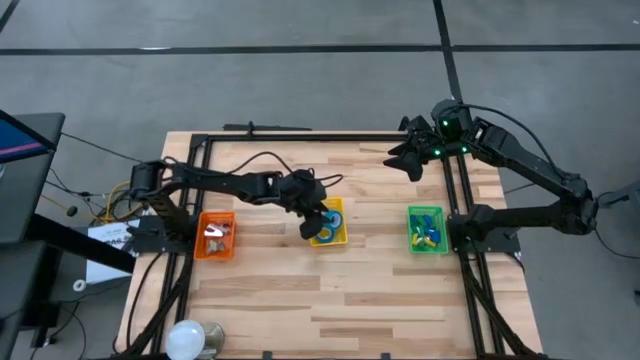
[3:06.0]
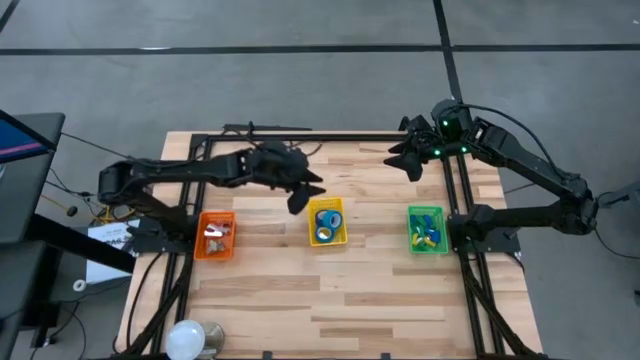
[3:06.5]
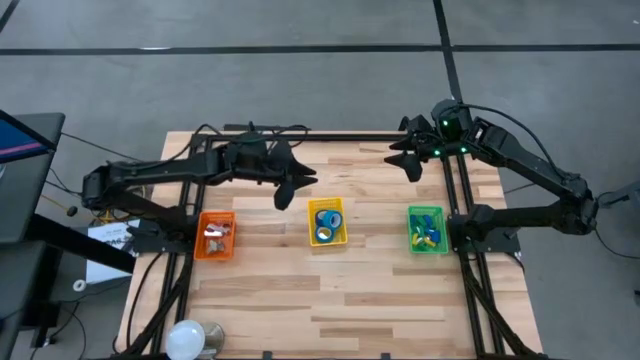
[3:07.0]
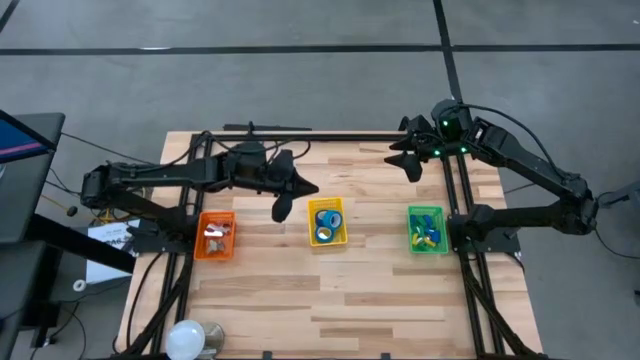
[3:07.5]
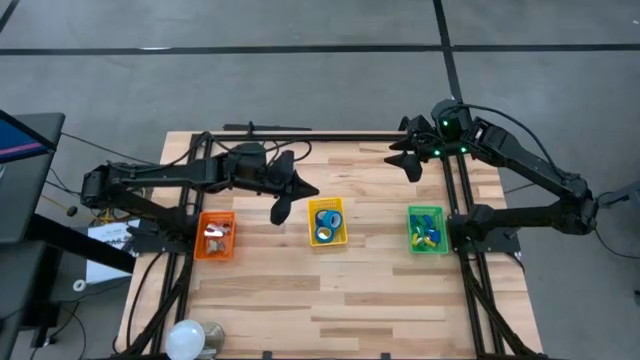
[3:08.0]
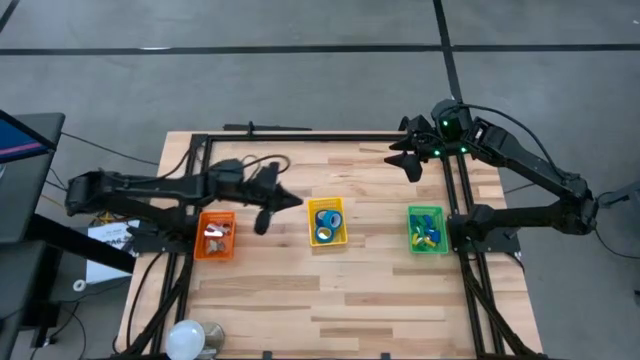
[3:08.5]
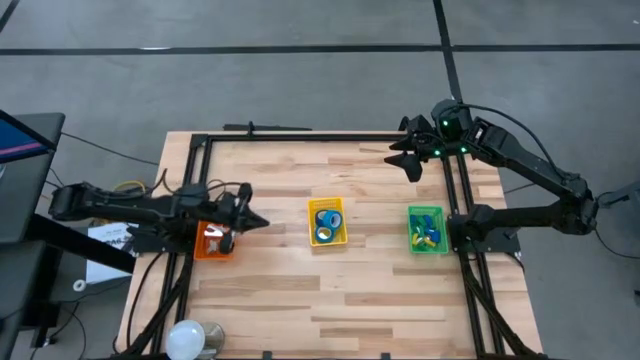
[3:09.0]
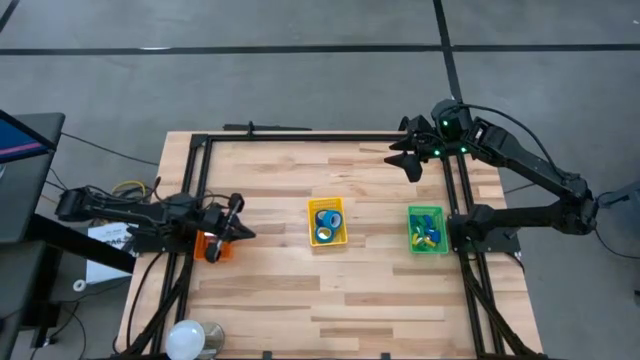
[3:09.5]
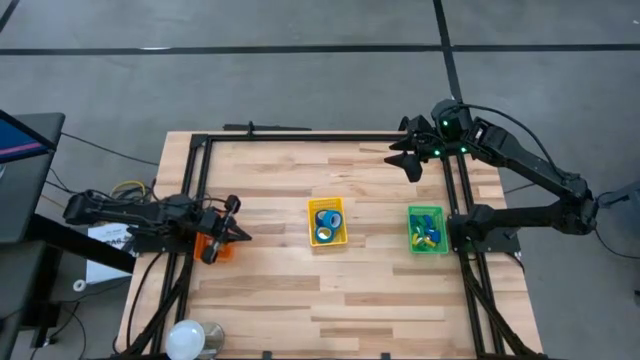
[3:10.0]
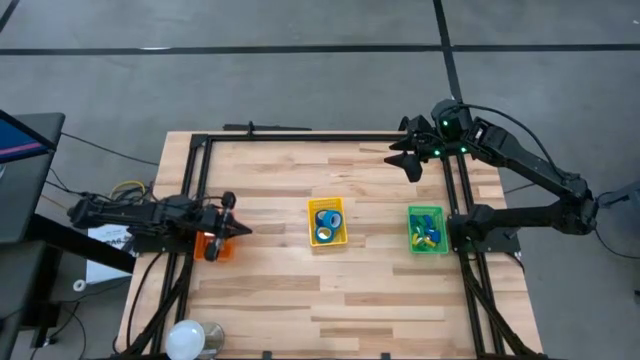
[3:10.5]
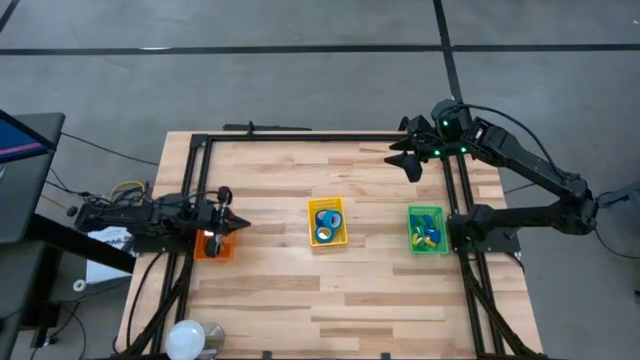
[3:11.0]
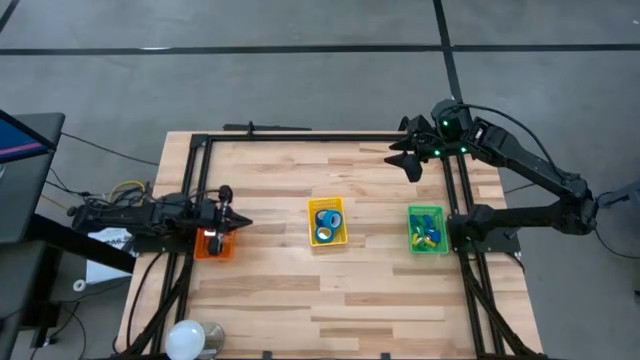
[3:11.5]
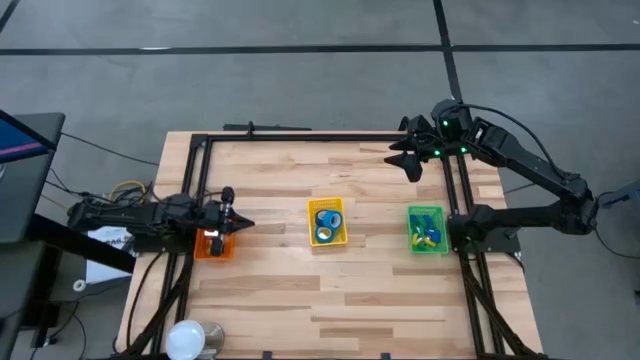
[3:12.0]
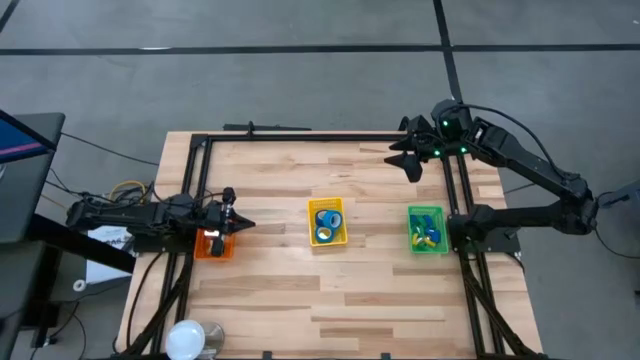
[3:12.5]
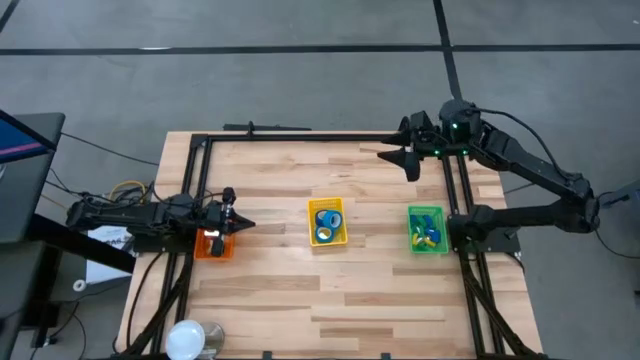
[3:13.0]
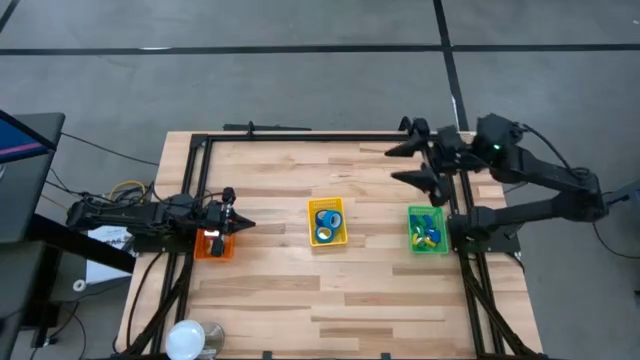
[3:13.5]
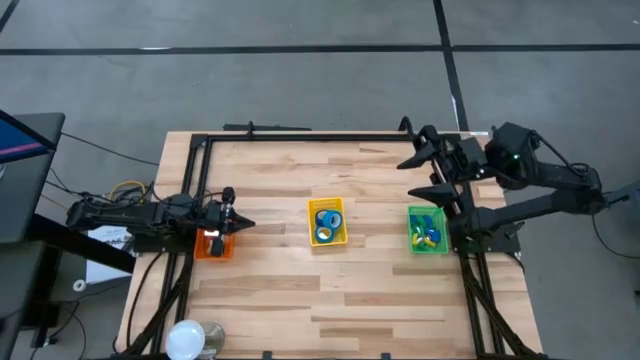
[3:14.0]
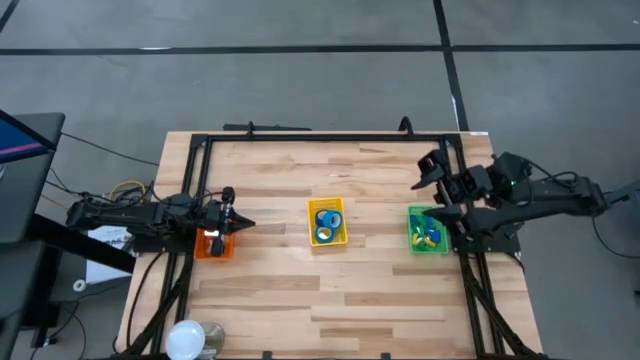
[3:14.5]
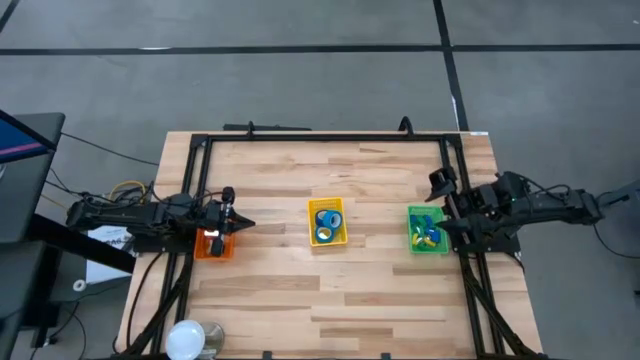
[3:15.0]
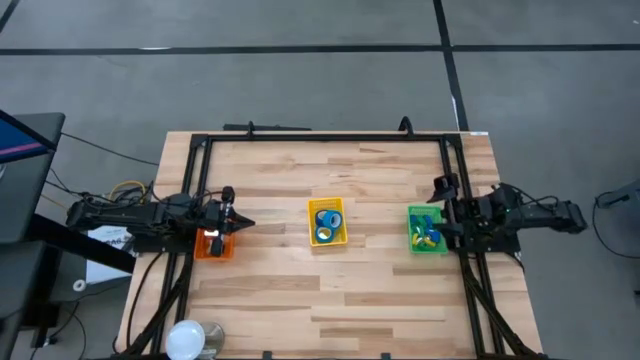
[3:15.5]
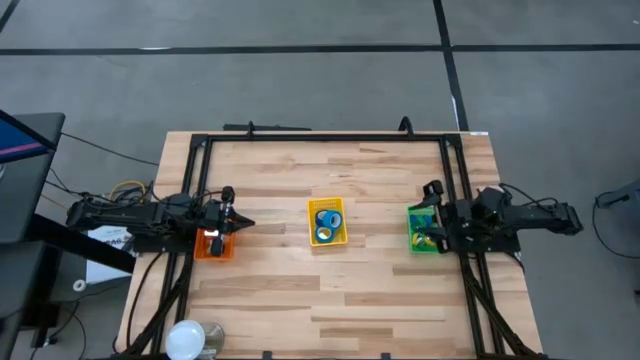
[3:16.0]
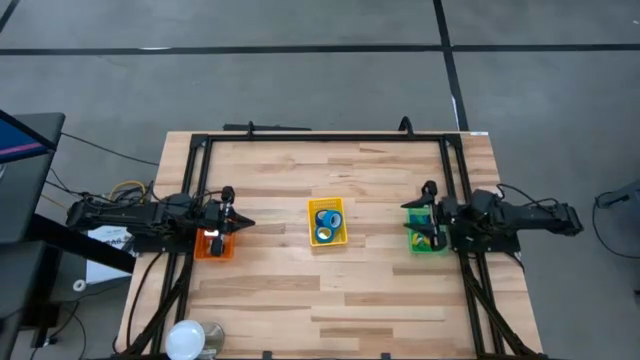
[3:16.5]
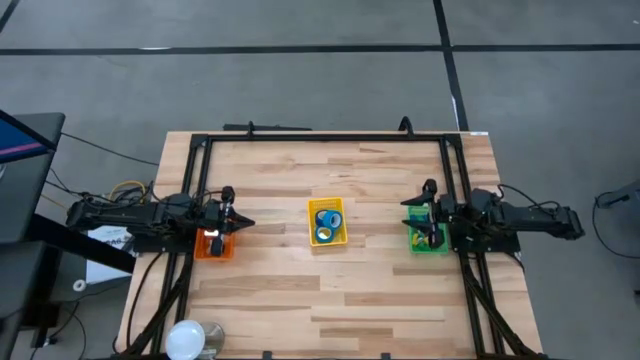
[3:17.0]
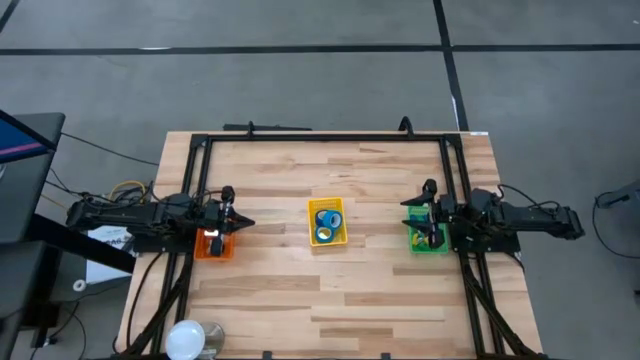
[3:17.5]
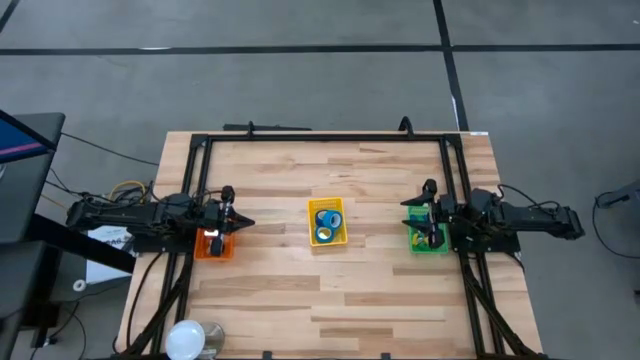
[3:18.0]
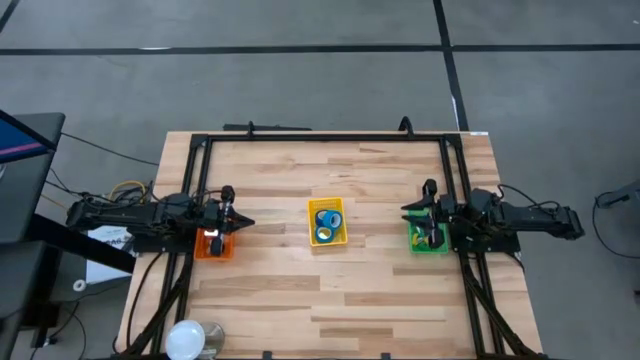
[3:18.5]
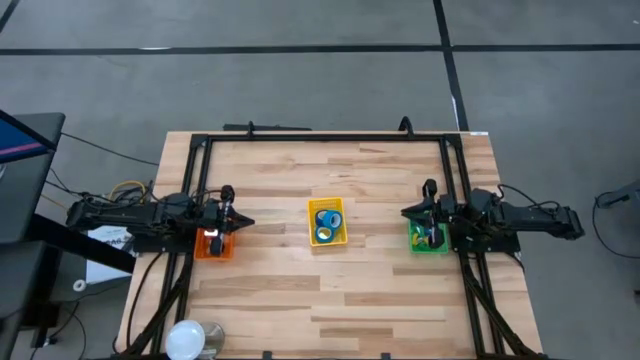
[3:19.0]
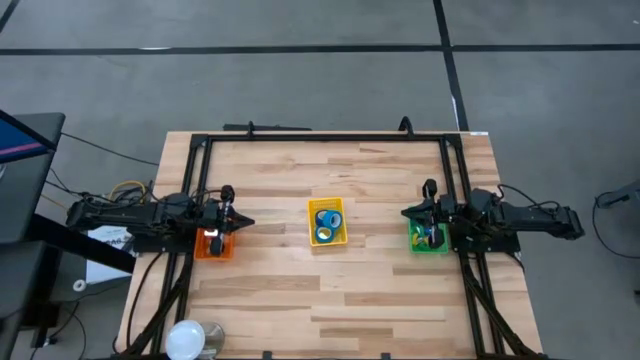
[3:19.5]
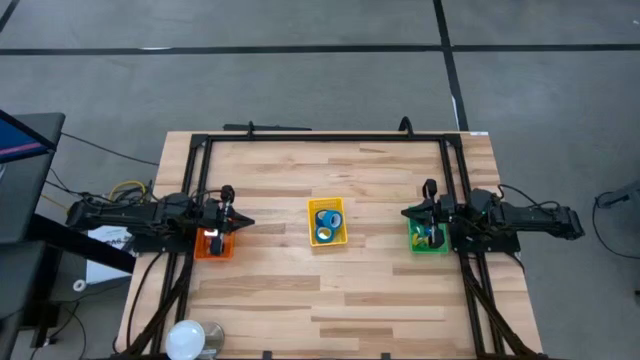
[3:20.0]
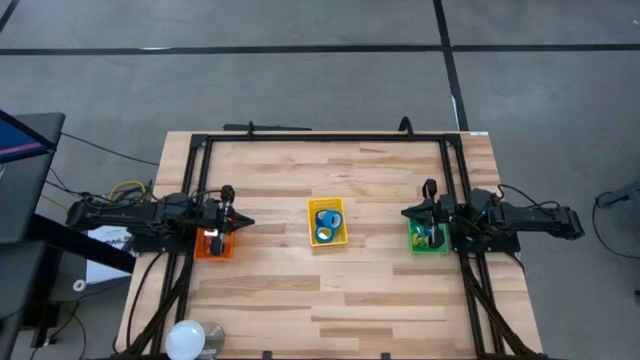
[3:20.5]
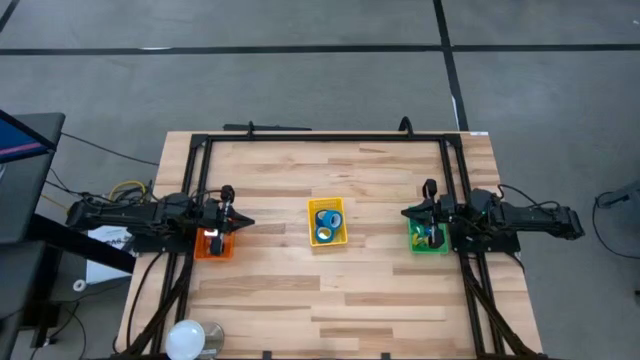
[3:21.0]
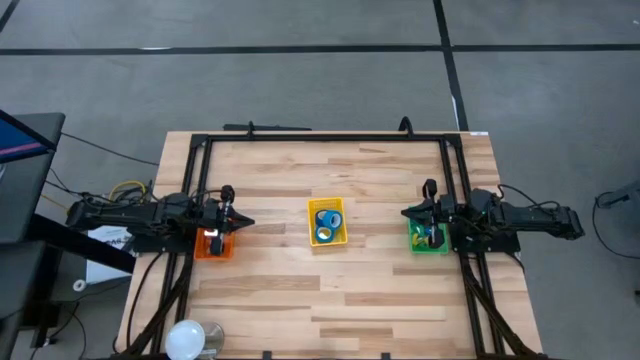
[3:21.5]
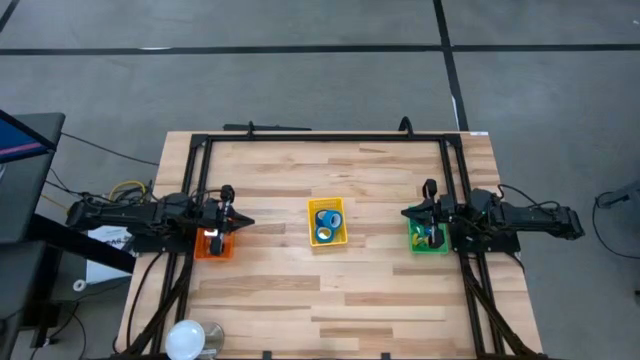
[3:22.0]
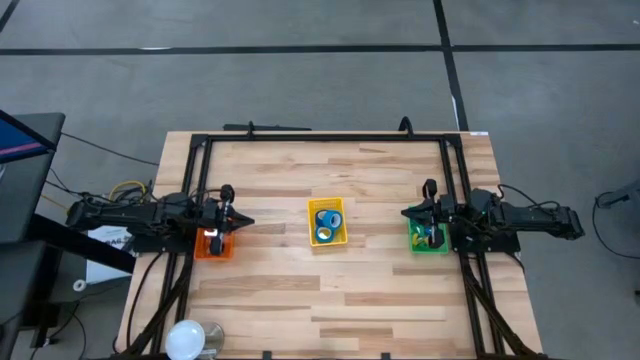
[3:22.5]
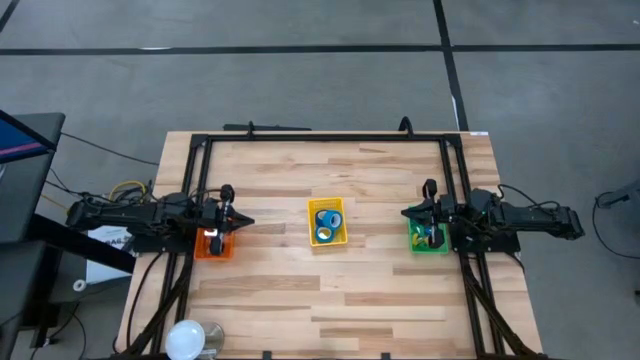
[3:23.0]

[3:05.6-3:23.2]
Task: Pick and place Stapler, Stapler remover, tape
Return to Home Position

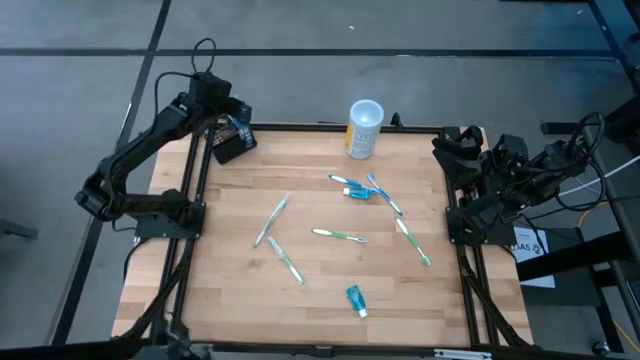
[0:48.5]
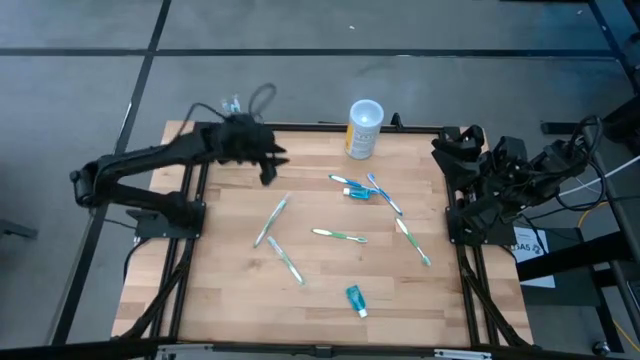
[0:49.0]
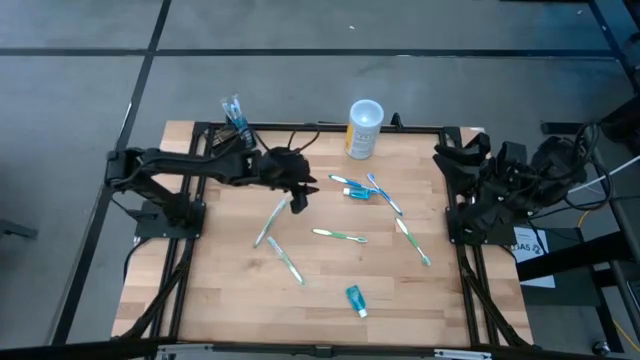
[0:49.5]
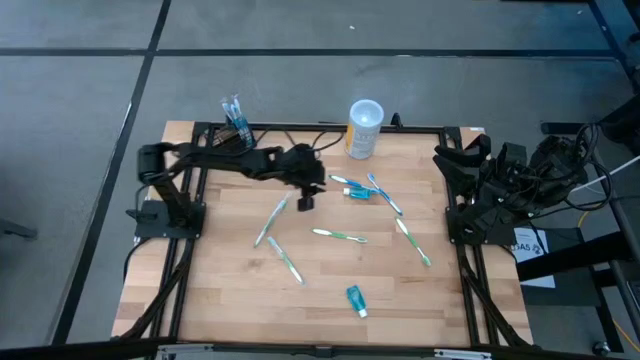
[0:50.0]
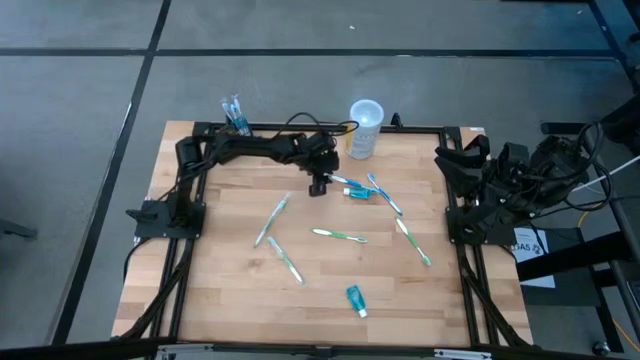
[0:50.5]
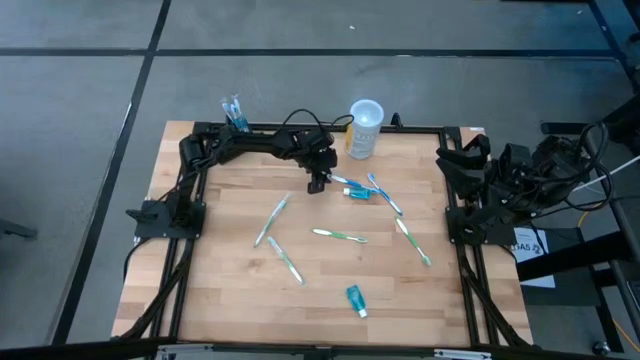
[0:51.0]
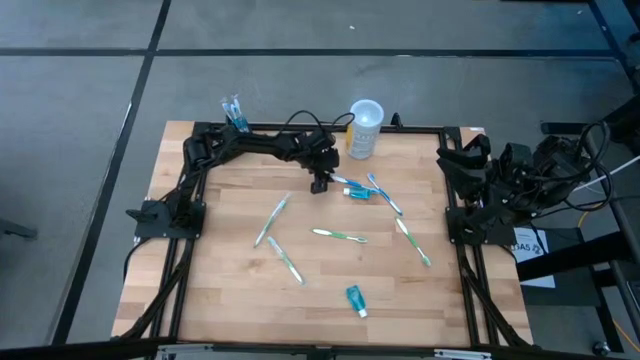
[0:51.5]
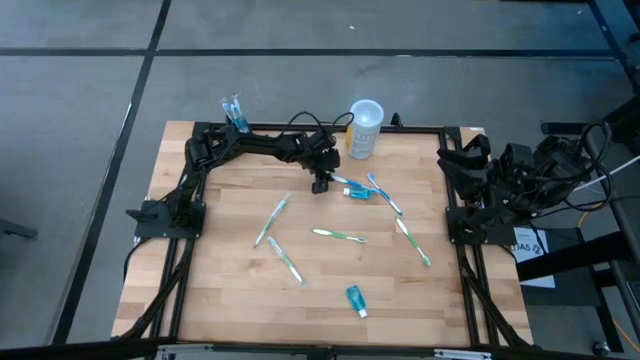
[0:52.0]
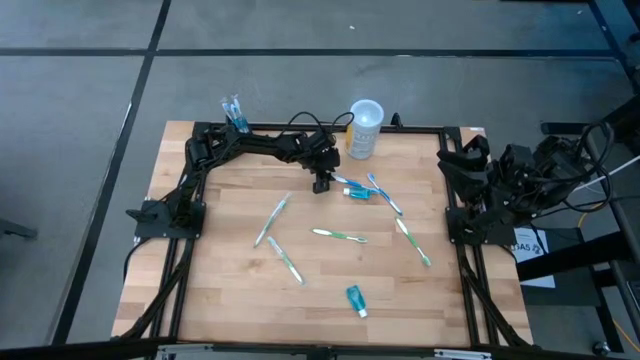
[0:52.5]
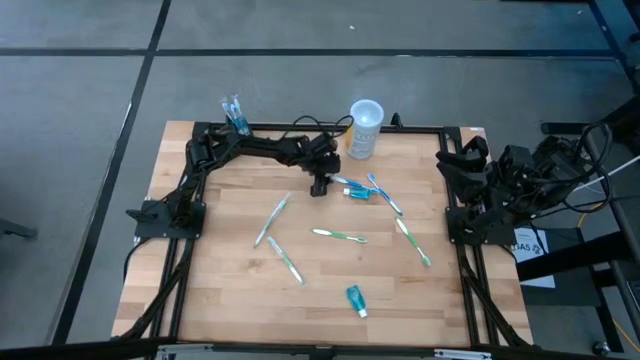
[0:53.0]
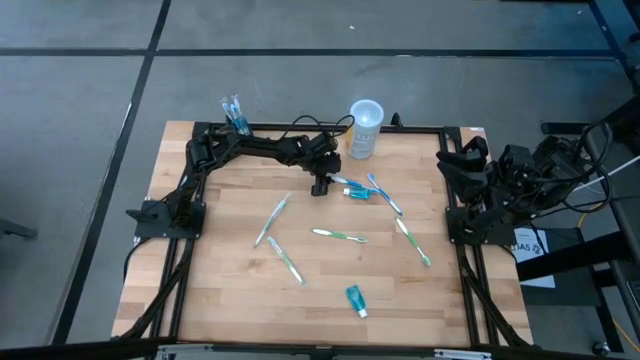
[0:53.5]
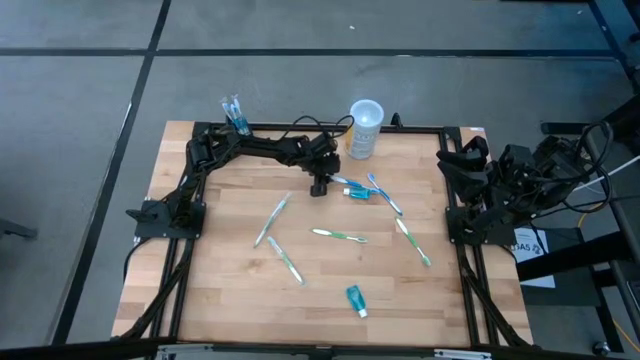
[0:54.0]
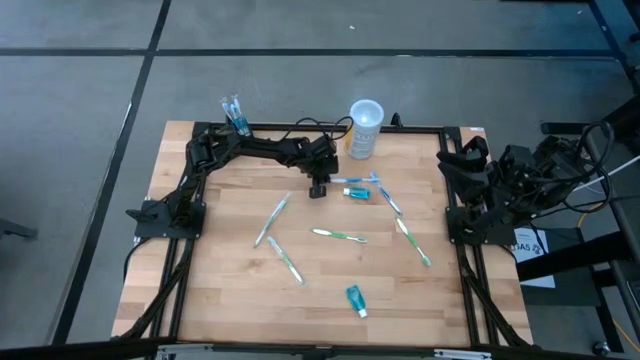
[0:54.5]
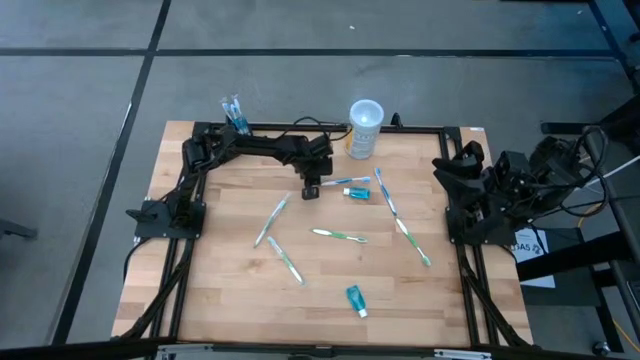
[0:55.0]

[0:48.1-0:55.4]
Task: Pick & Place toothbrushing station
Put the blue toothbrush into the right section of the black organizer
